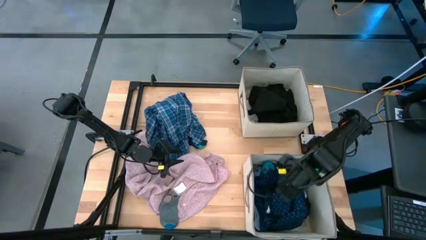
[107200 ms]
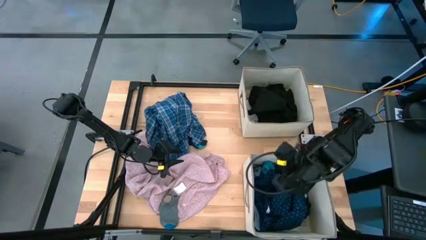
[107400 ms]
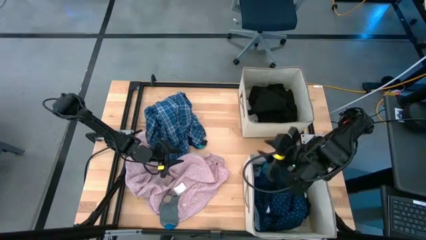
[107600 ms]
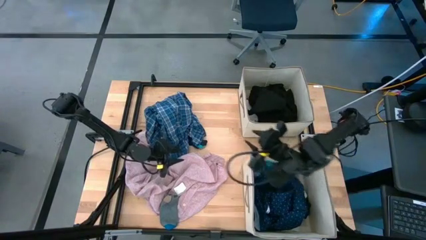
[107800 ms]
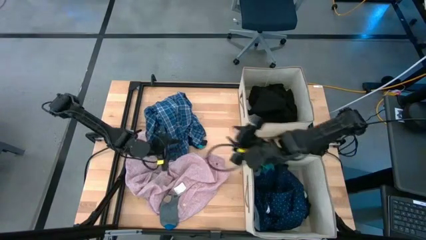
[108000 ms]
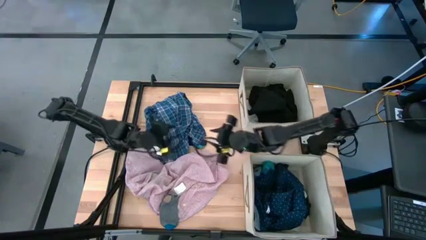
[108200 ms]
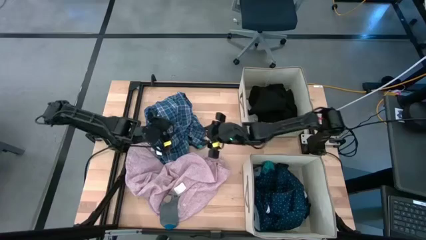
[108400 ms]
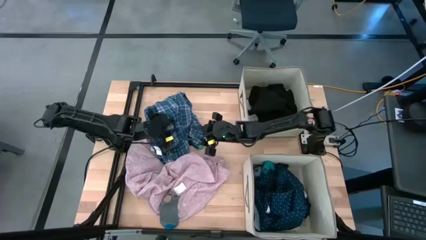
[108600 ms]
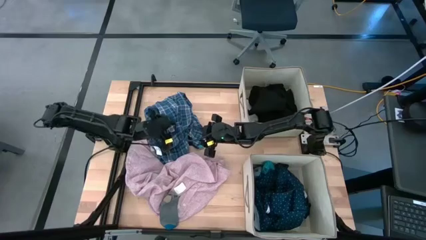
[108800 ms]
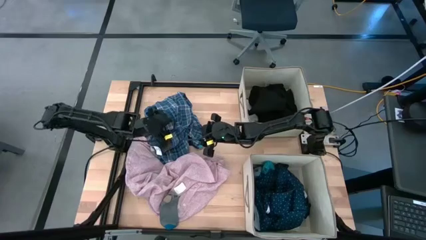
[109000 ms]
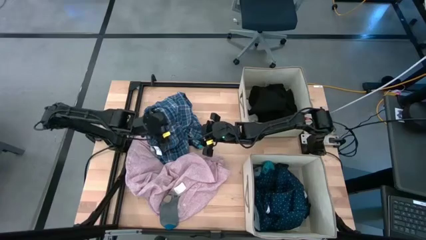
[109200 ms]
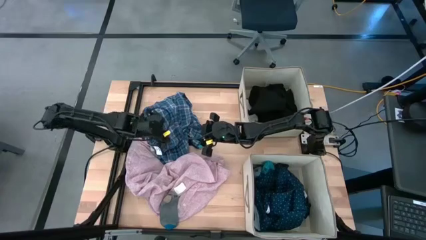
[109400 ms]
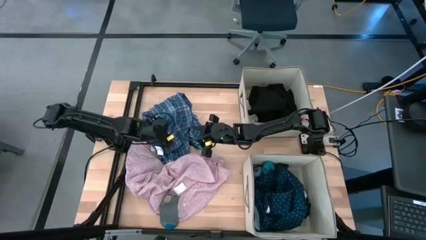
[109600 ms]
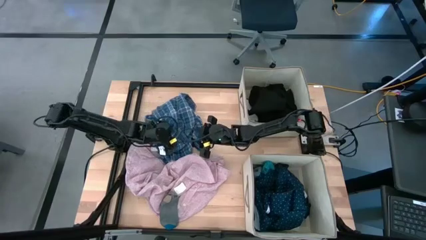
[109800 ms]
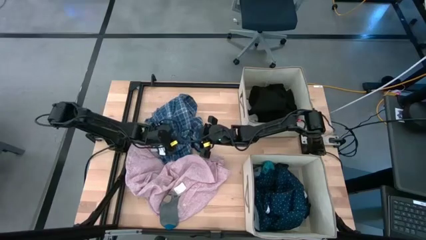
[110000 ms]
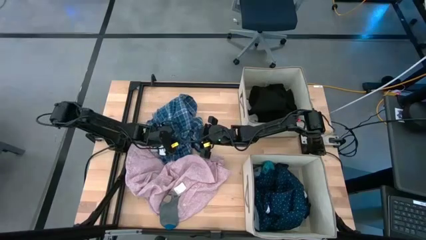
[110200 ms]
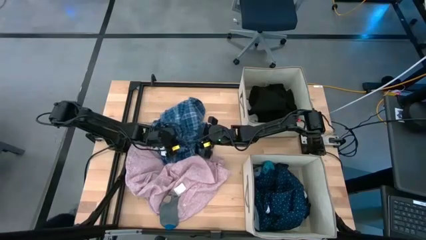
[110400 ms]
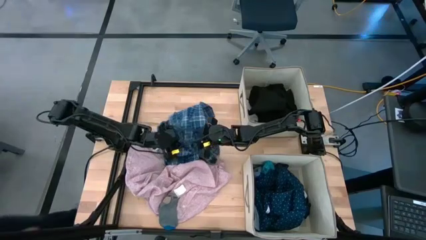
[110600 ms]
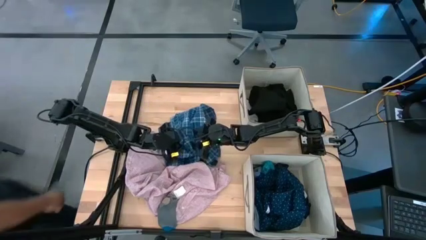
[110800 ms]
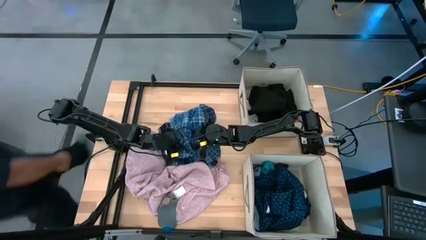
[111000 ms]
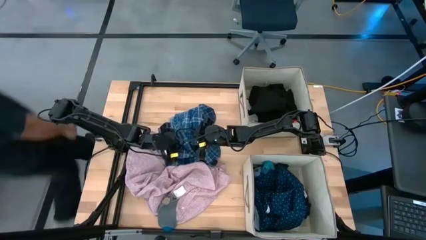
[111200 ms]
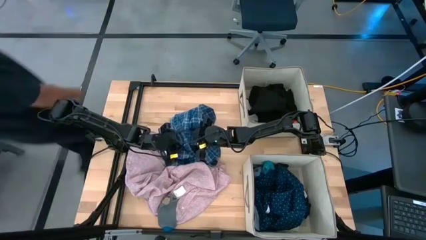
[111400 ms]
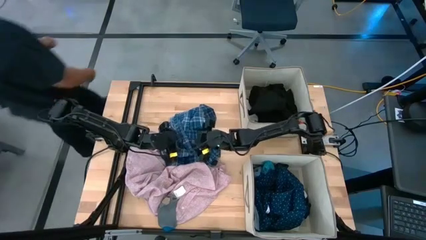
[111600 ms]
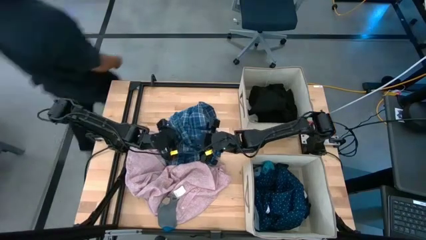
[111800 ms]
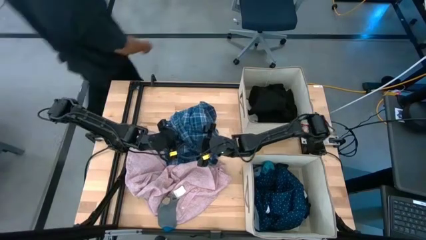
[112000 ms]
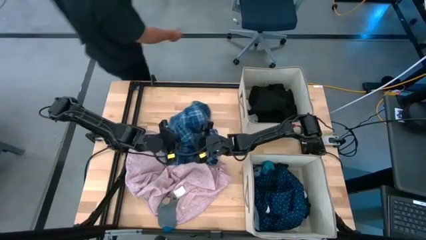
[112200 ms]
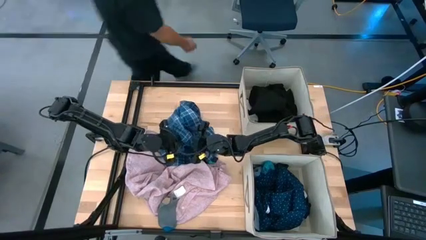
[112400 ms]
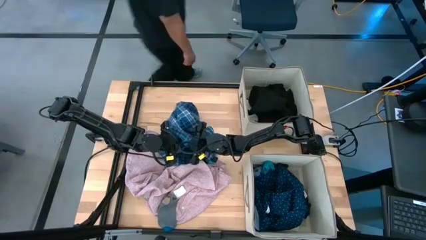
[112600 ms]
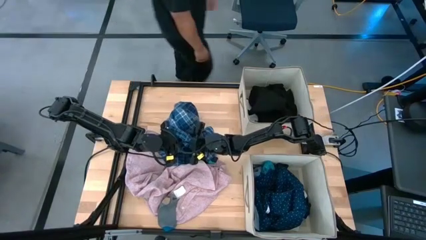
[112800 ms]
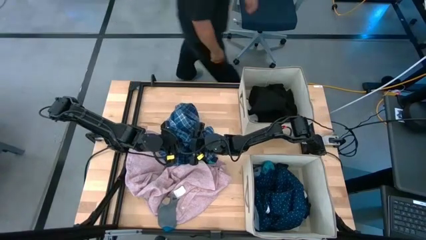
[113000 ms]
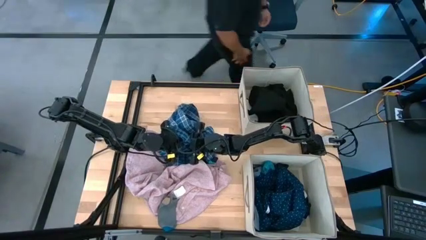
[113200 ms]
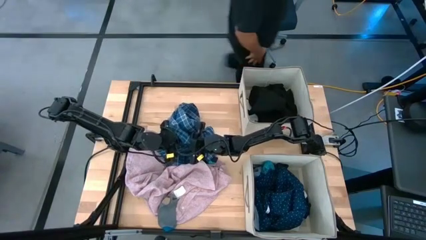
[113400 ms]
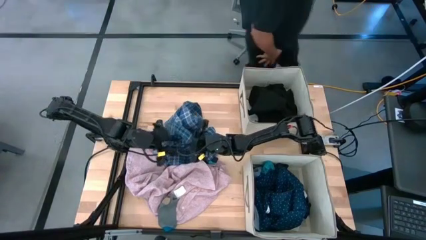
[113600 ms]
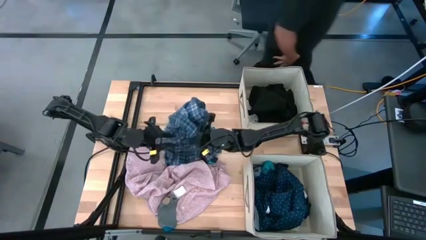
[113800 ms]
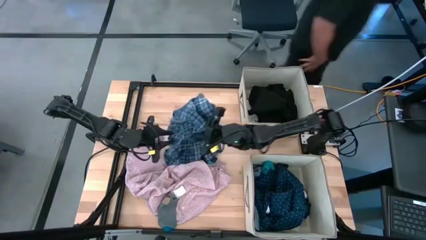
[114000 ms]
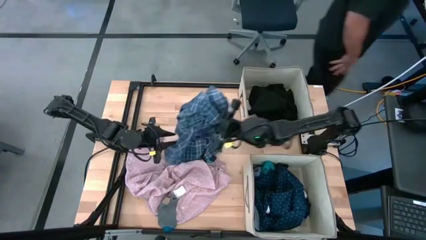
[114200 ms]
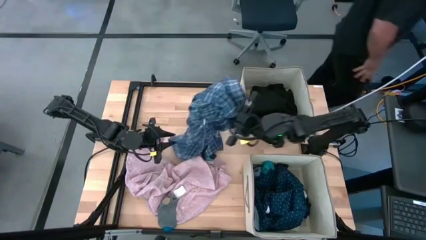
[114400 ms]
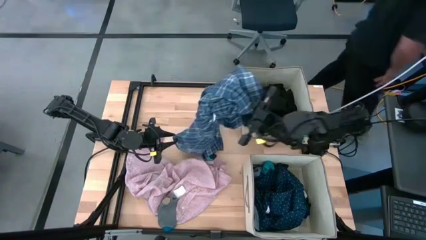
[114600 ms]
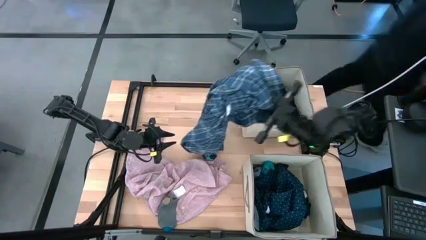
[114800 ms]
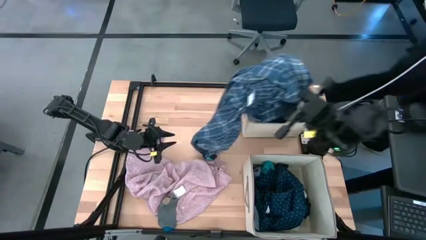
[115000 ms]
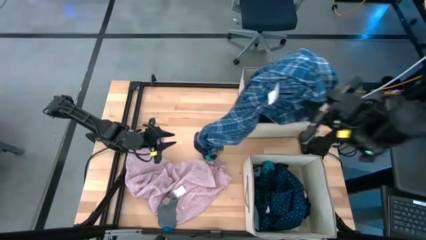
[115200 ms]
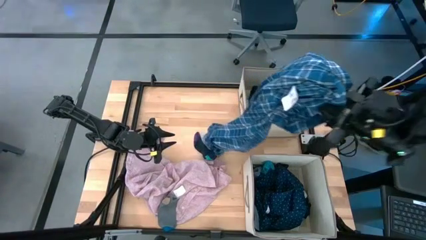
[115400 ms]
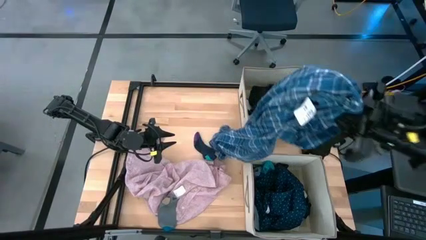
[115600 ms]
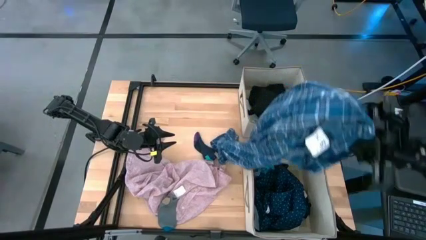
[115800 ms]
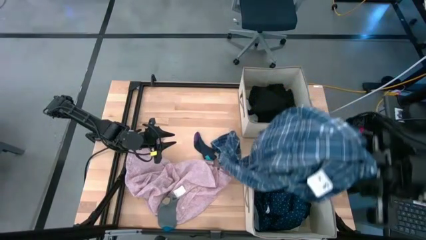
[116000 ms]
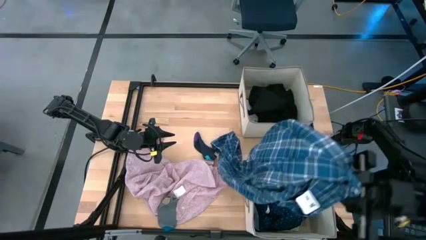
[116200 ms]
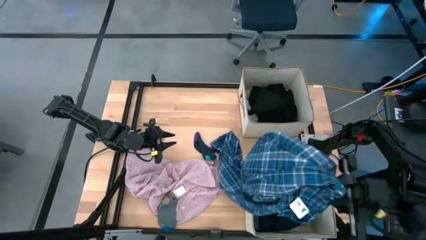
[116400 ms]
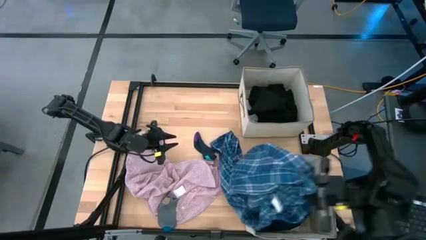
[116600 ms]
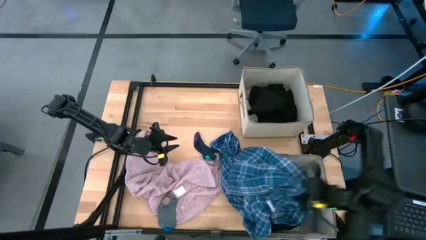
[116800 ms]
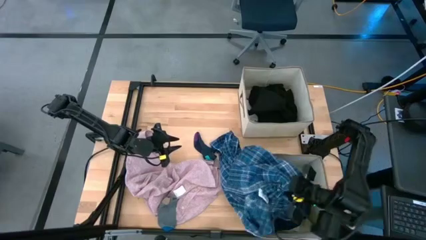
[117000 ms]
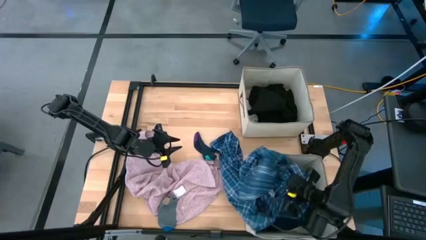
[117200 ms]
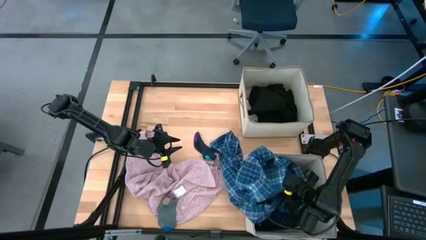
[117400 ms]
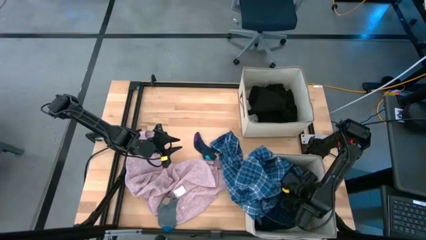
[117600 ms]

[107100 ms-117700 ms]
Task: Sort clothes
Put the blue checkered polo shirt into the bottom laundry organizer

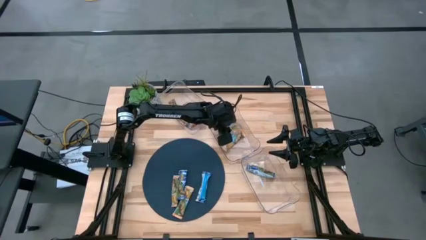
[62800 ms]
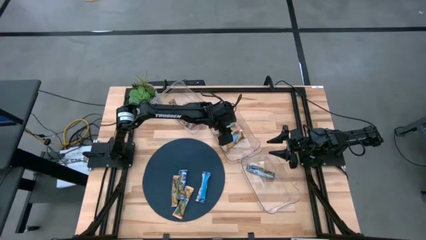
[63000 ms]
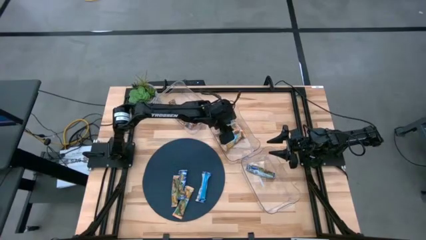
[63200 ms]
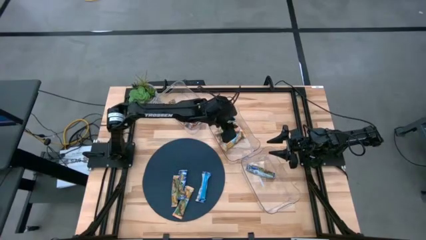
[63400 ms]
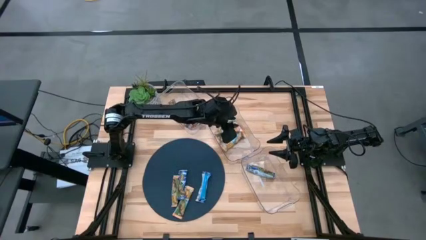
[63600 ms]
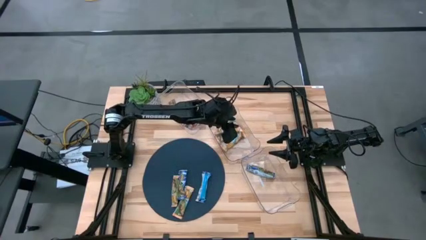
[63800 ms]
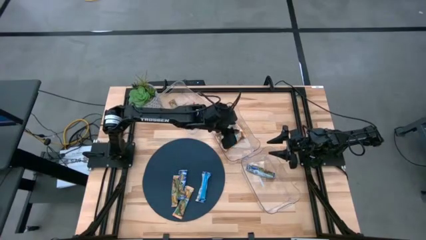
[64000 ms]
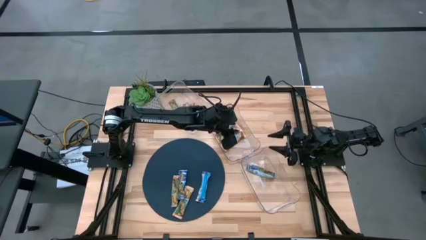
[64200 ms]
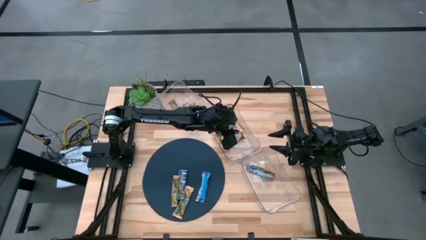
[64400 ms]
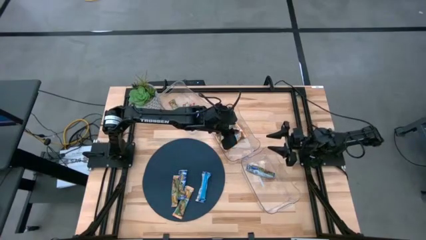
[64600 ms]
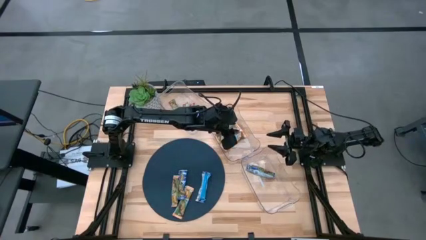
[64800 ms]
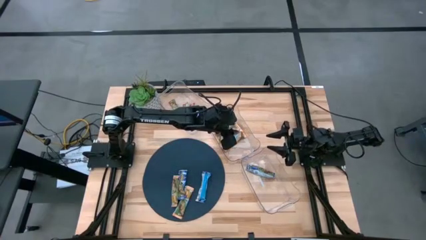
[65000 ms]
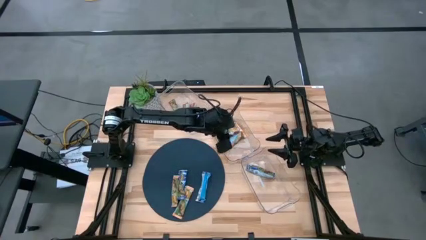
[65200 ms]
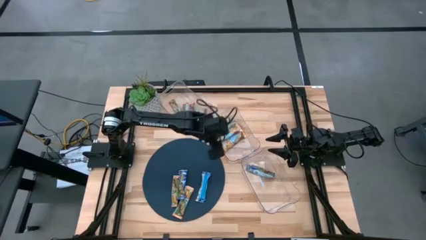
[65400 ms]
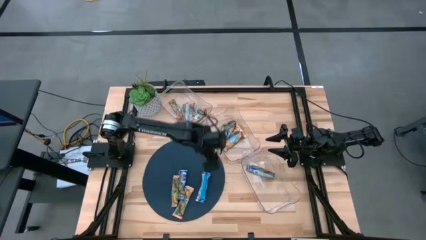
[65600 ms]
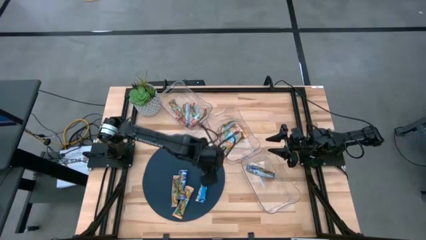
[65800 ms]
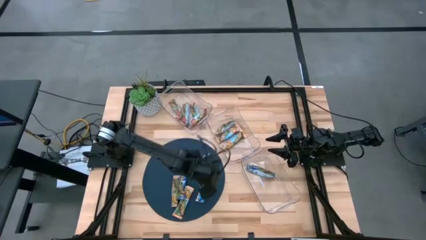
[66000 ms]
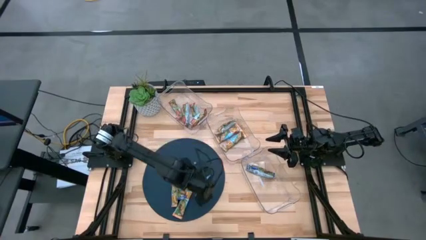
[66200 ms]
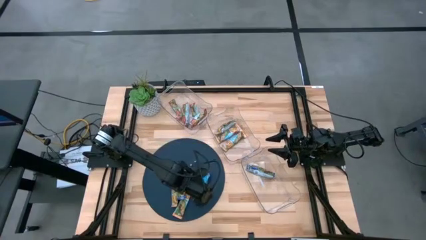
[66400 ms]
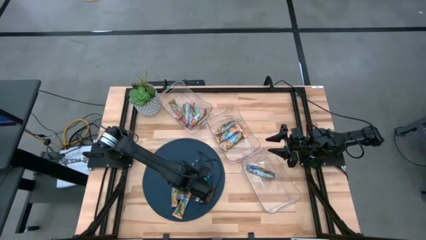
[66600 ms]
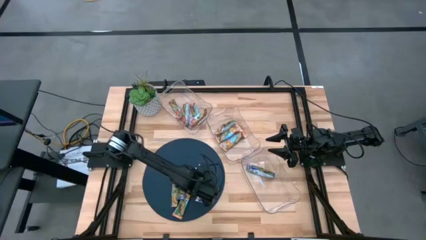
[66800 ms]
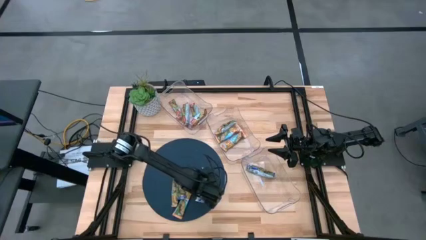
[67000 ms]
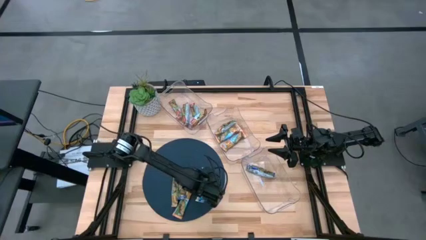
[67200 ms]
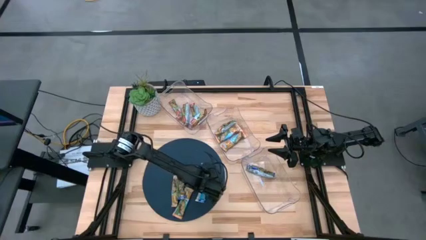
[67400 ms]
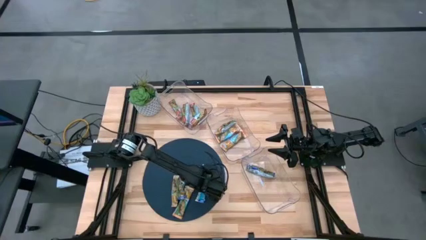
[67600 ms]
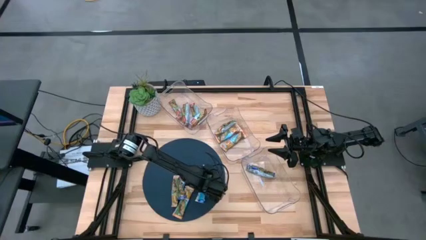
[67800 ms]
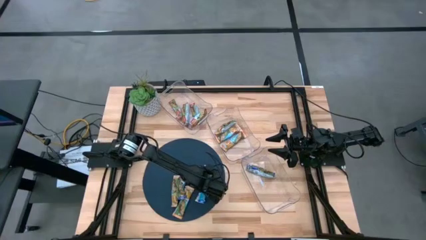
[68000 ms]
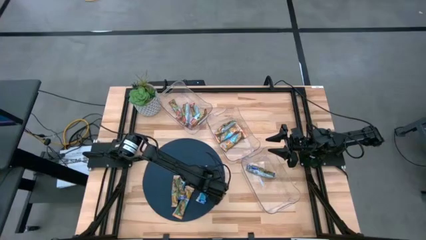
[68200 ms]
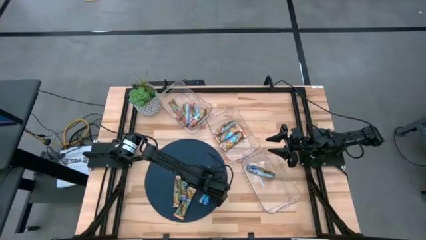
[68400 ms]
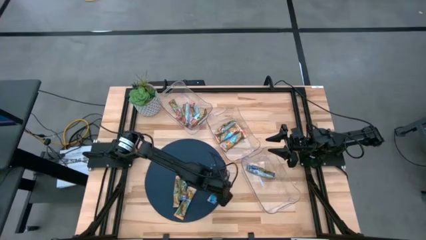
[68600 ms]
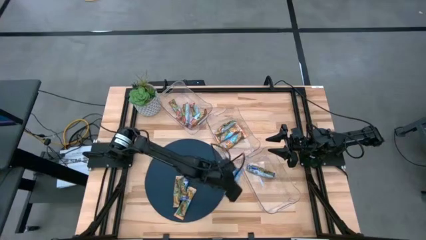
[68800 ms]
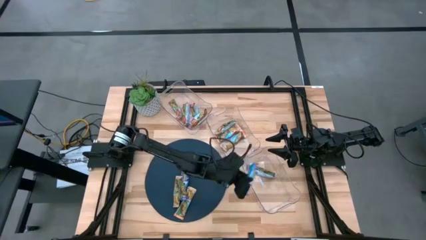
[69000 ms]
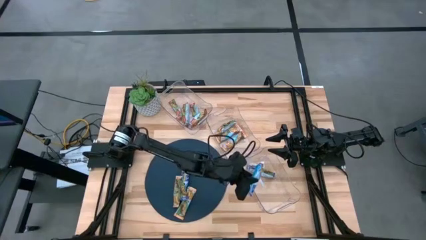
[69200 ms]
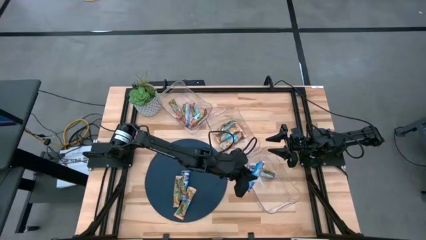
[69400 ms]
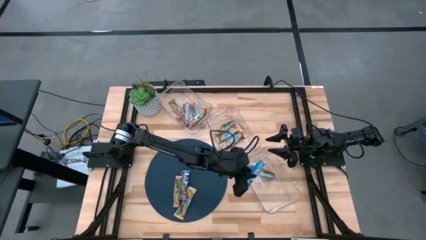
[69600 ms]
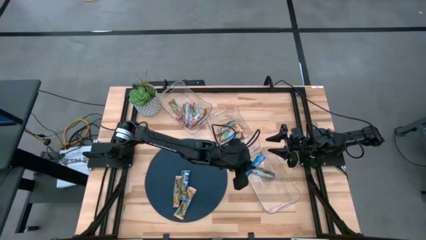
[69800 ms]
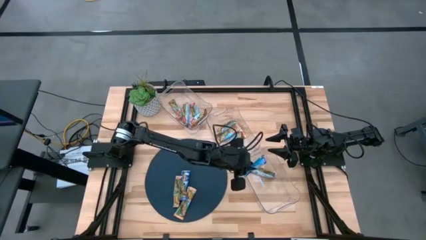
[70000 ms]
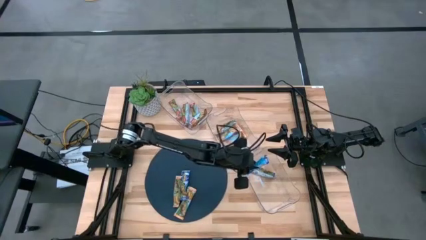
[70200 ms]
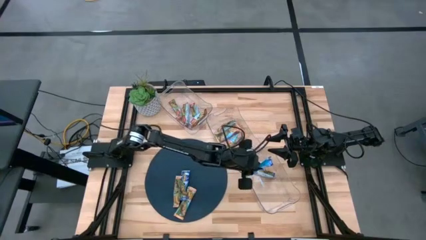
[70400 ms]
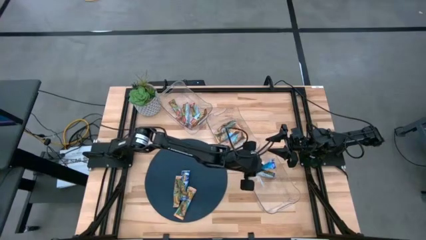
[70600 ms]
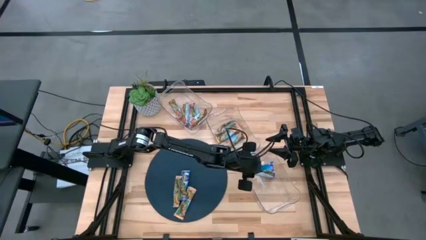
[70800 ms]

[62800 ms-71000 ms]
Task: Pick and place Granola Bars by type
Put the blue granola bar into the bottom transparent bin
